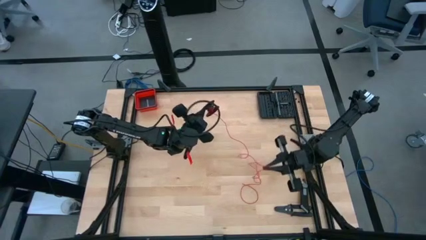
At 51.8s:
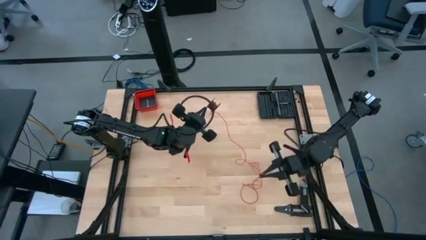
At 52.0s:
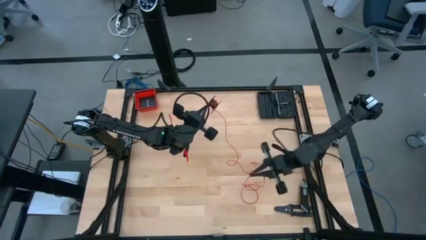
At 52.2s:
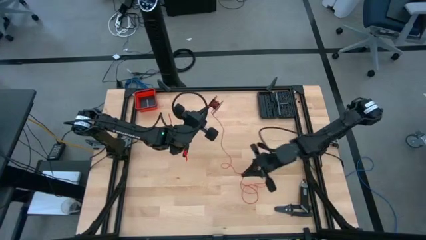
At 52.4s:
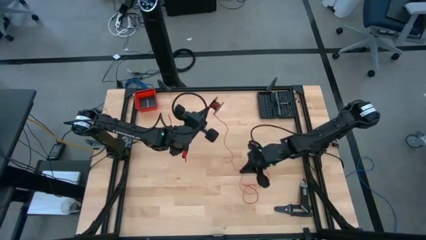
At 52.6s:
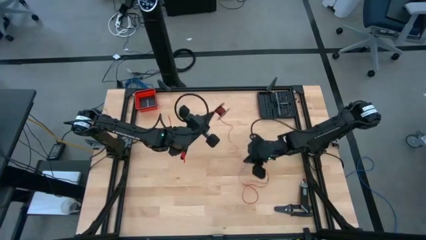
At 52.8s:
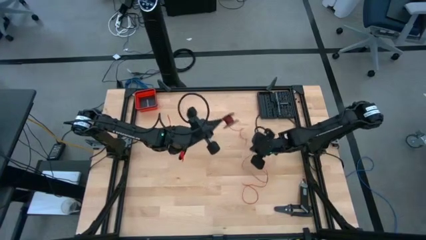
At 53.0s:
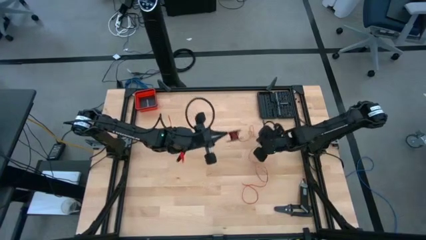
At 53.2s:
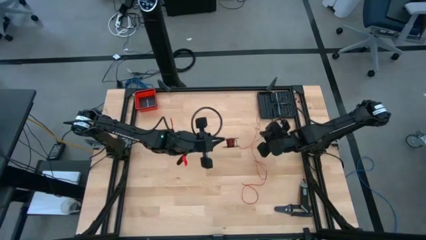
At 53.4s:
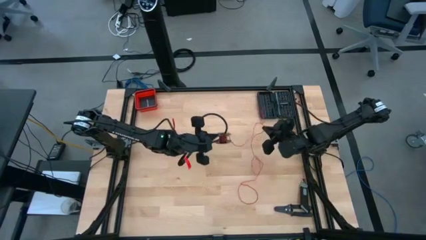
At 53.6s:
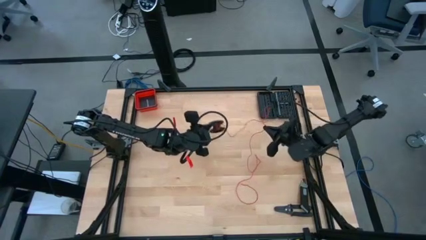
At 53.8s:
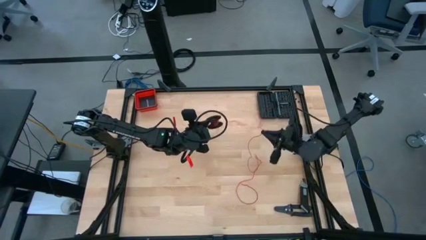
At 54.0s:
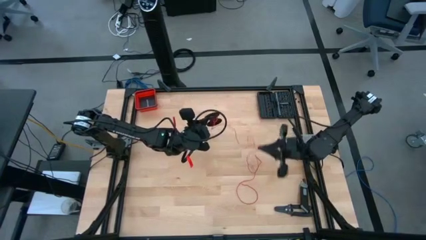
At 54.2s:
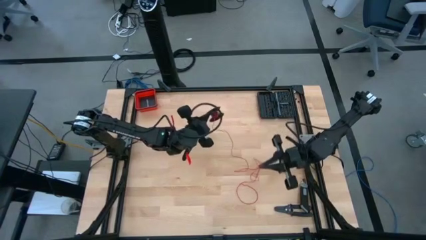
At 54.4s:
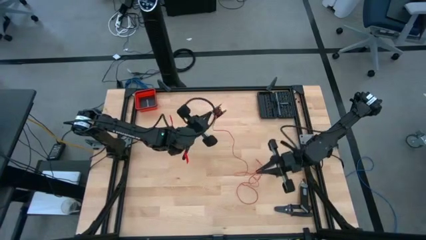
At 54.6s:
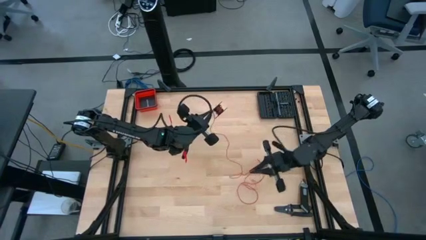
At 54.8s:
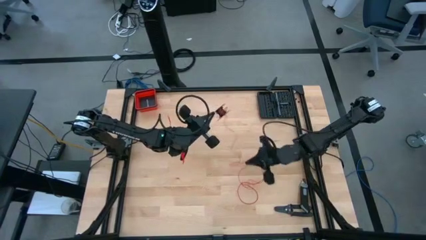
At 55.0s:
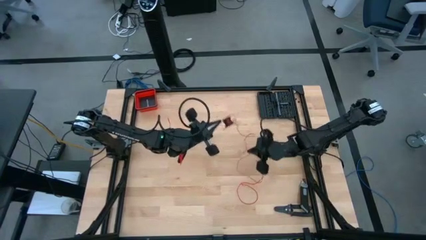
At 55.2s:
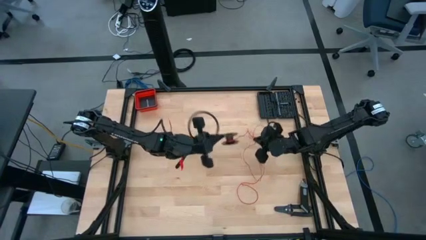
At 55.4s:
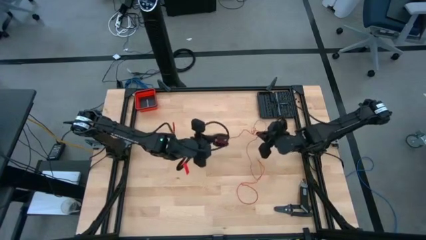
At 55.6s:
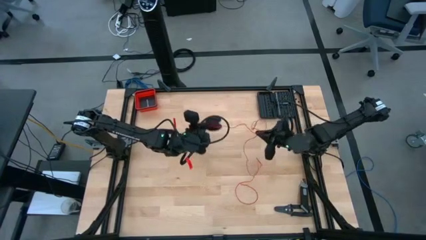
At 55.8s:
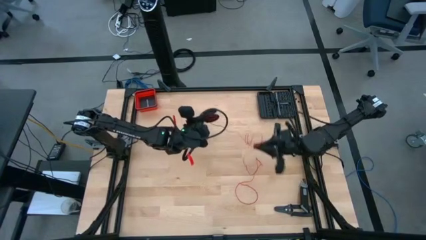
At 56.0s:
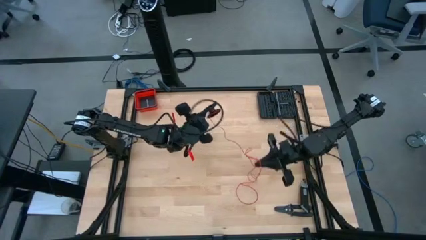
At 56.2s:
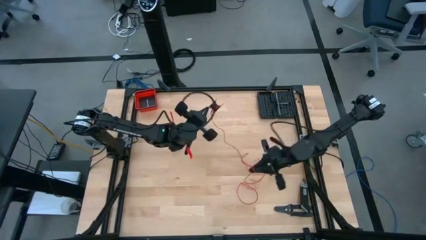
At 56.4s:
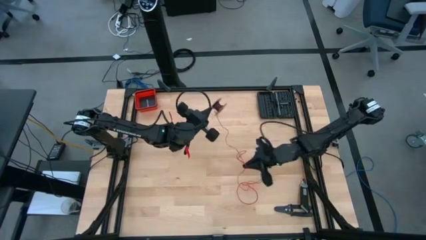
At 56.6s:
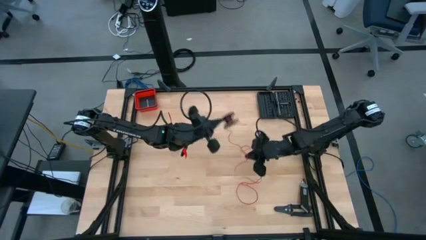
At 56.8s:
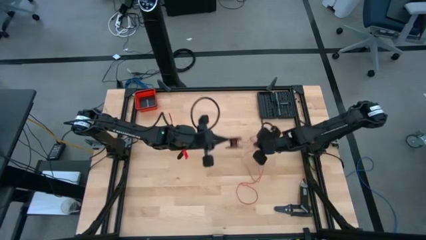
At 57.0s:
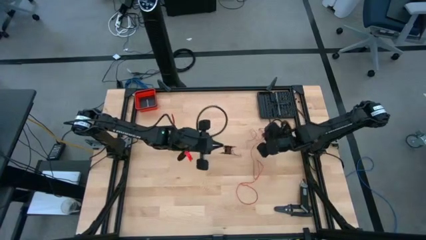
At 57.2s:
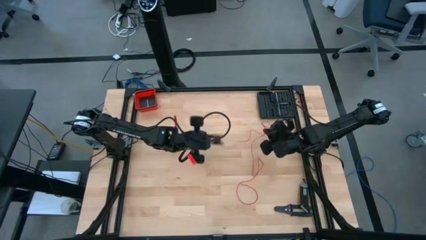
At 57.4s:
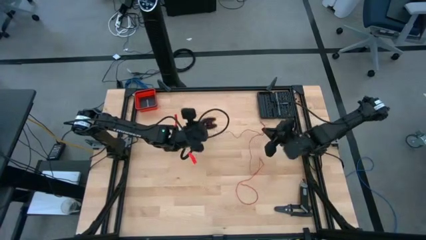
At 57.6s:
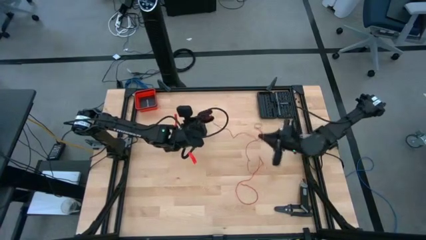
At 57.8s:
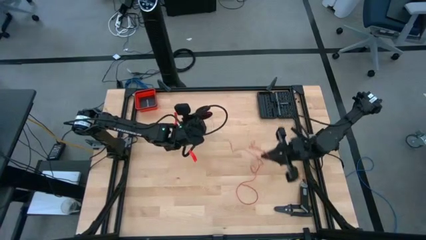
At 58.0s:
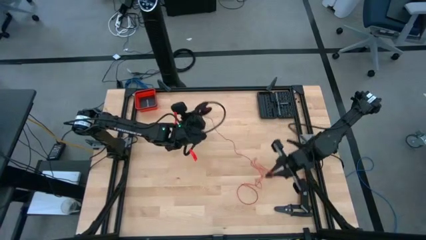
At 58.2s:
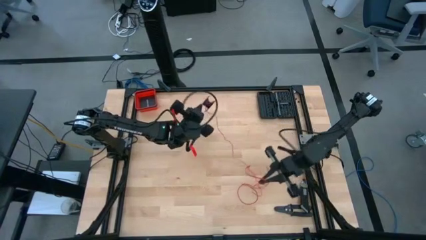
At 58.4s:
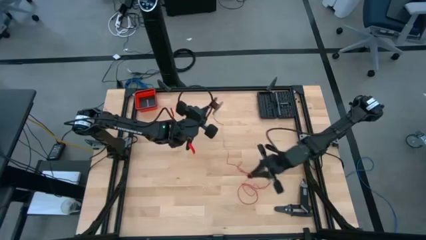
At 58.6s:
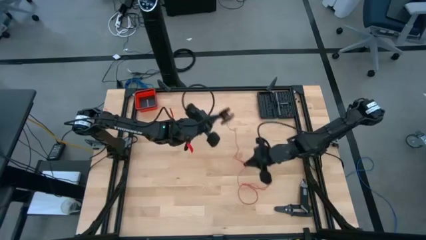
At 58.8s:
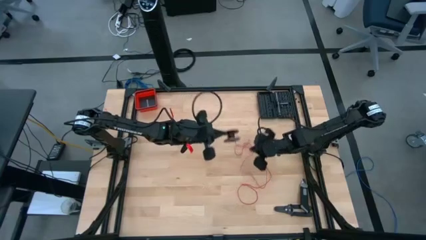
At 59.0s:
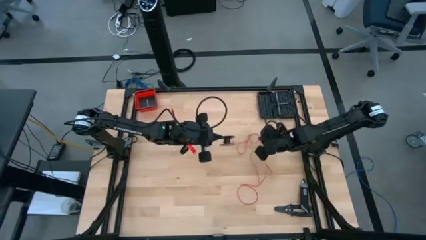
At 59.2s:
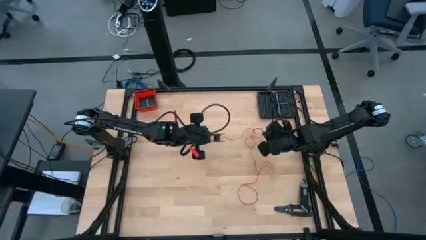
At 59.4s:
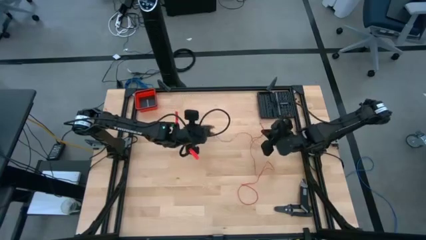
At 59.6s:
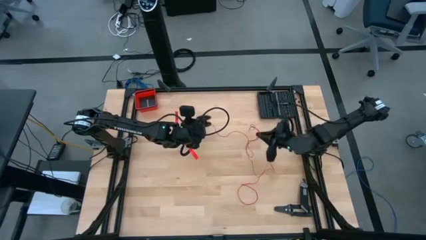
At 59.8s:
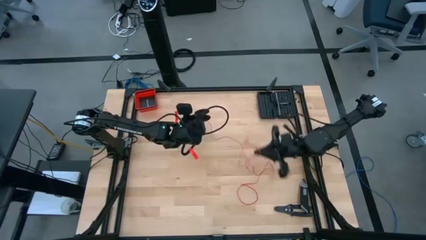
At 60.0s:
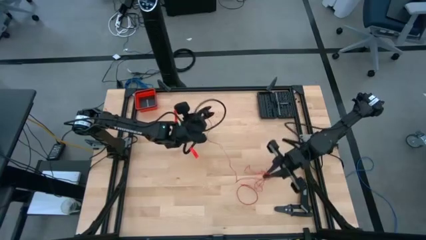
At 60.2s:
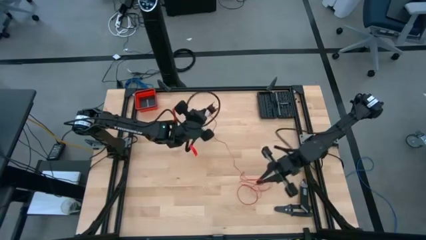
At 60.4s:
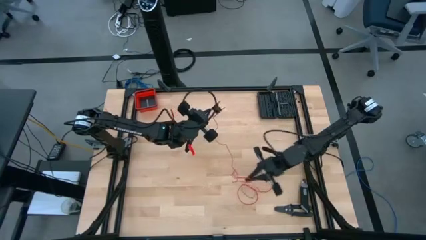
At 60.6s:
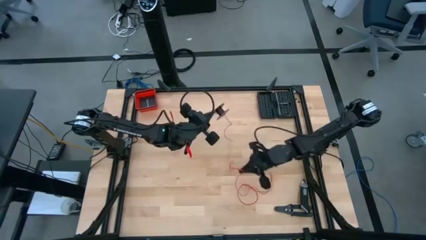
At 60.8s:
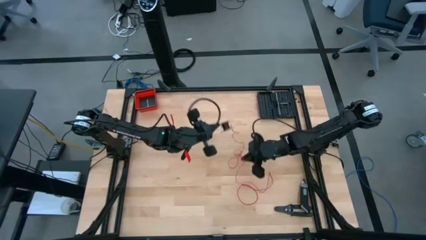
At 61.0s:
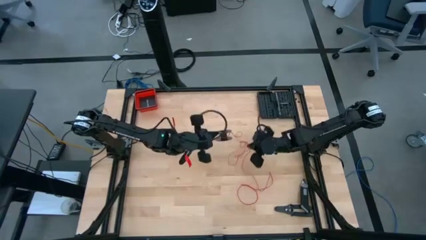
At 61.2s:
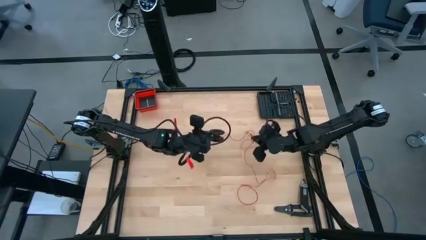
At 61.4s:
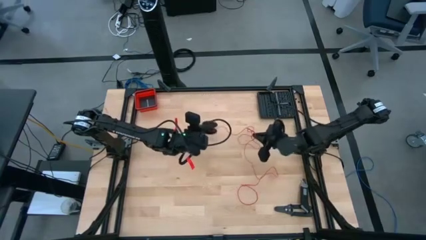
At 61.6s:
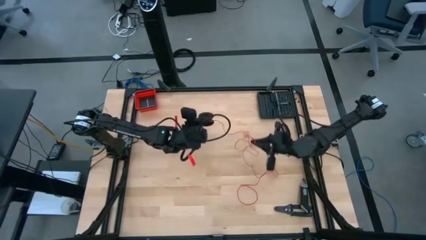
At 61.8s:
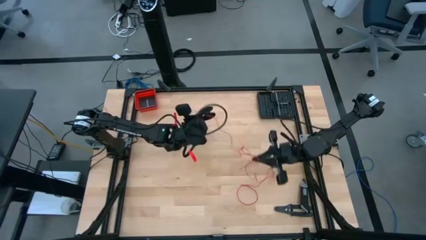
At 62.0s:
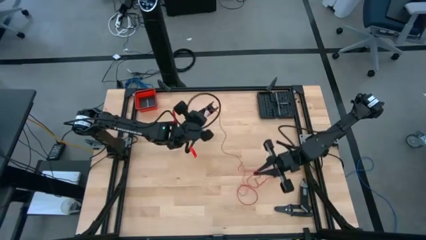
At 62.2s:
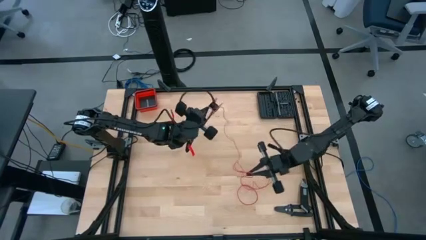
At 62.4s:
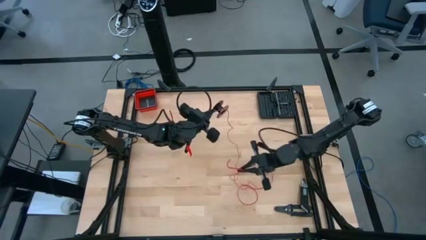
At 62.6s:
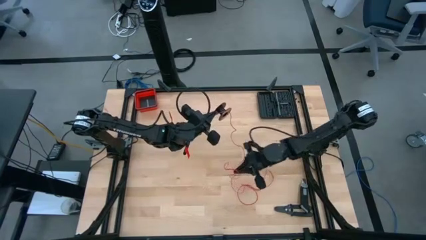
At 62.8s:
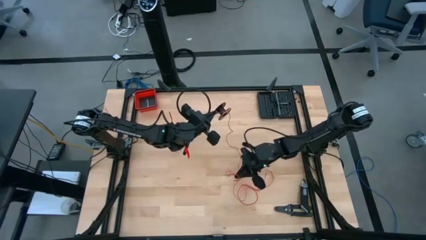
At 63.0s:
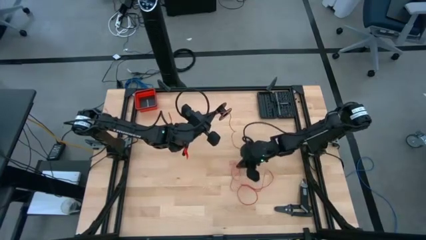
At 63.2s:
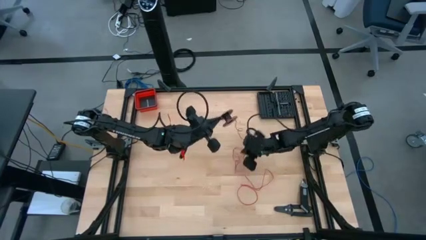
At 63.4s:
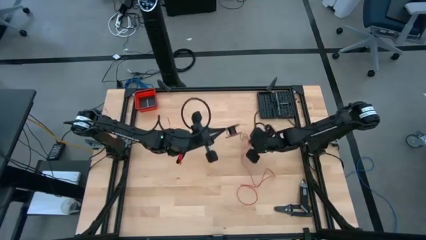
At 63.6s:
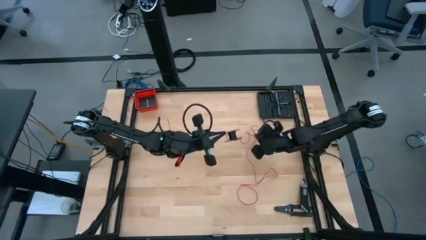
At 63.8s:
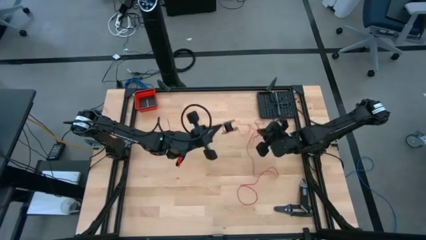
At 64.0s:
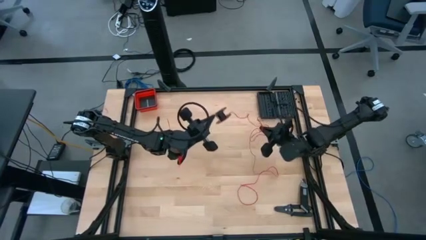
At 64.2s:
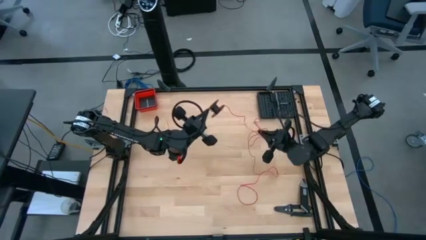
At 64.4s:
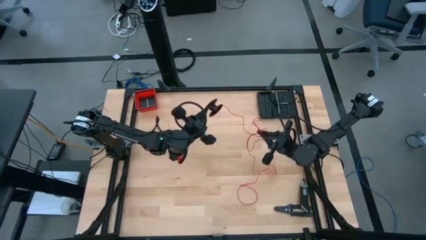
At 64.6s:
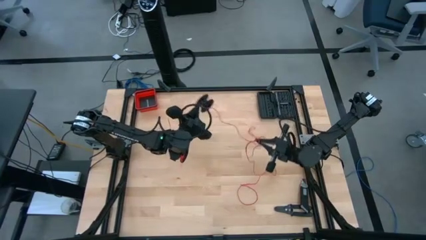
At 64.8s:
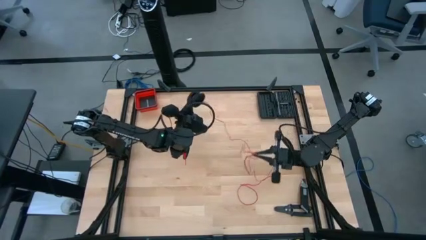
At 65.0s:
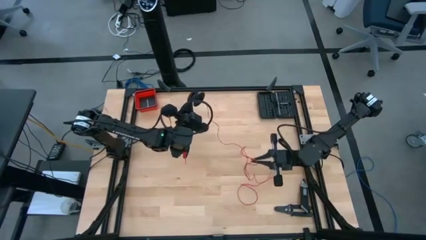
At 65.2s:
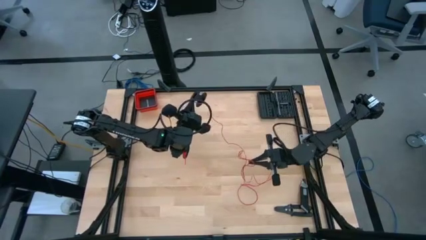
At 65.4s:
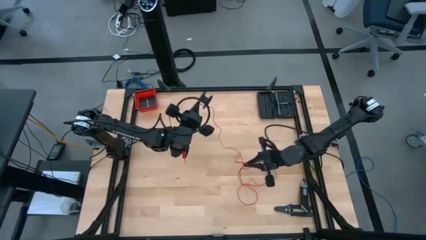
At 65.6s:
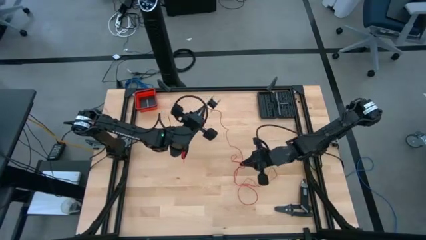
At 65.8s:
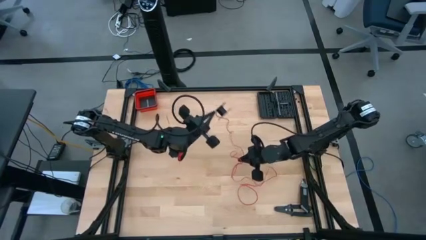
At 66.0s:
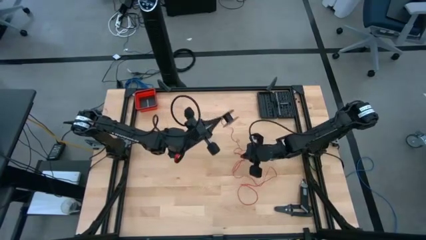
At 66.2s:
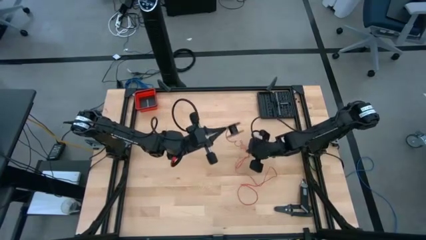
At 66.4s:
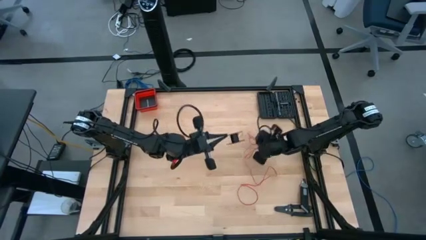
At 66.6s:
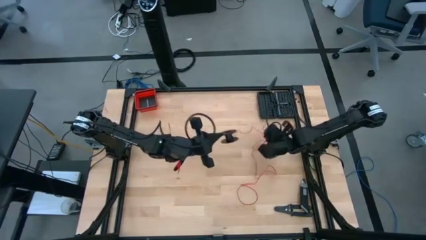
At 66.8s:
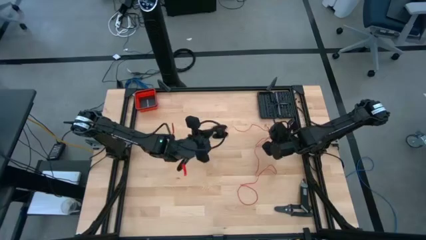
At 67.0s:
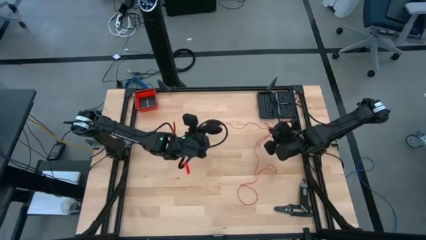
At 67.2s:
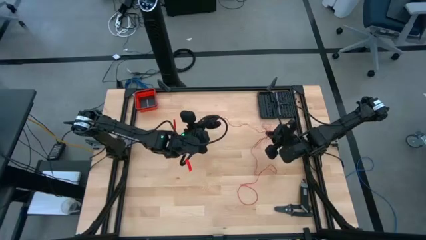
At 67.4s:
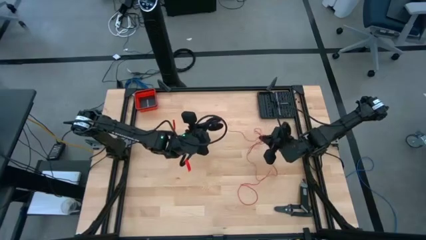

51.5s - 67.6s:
Task: Coil cords
Uncoil the red wire from the spool
